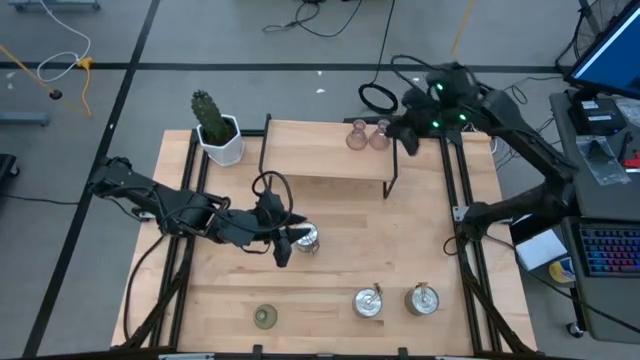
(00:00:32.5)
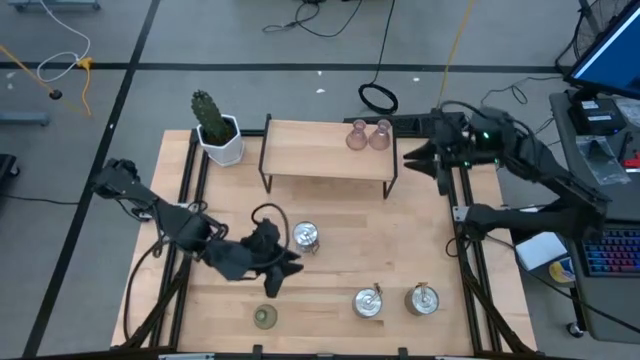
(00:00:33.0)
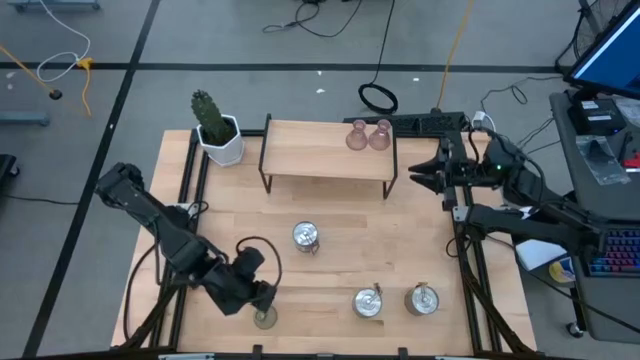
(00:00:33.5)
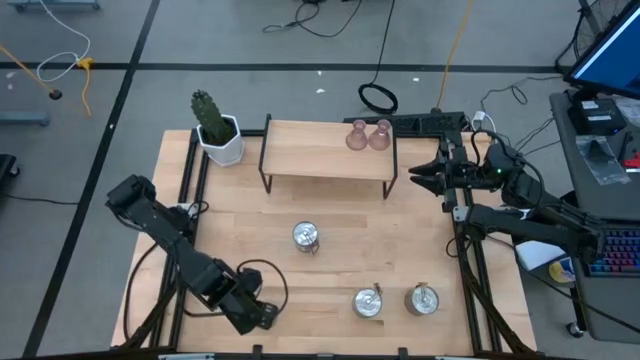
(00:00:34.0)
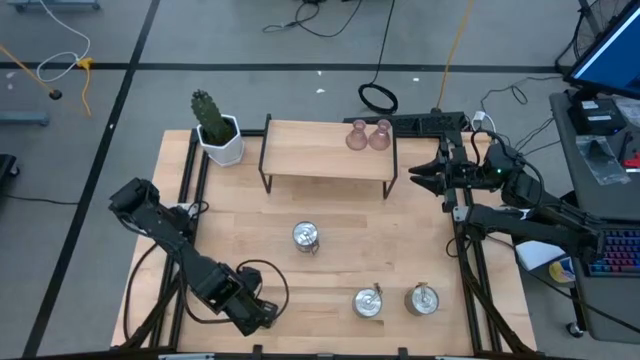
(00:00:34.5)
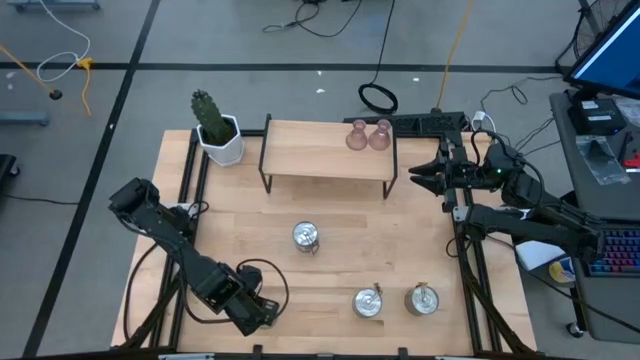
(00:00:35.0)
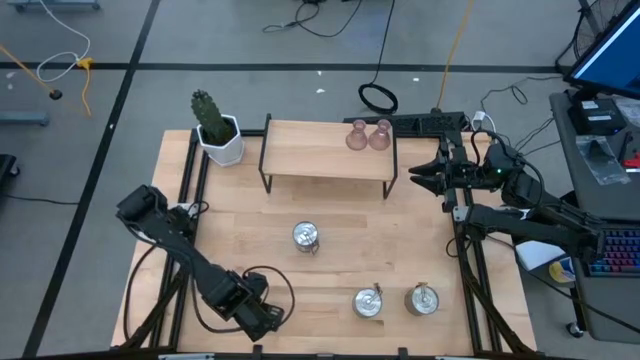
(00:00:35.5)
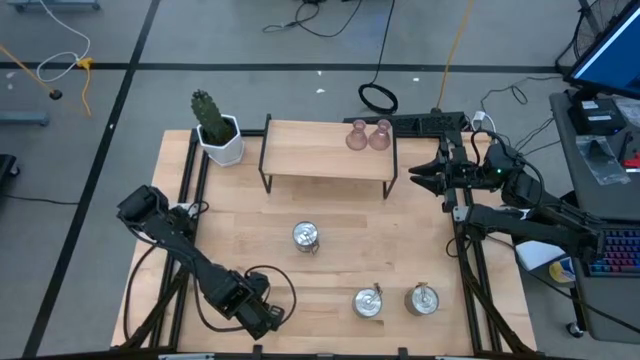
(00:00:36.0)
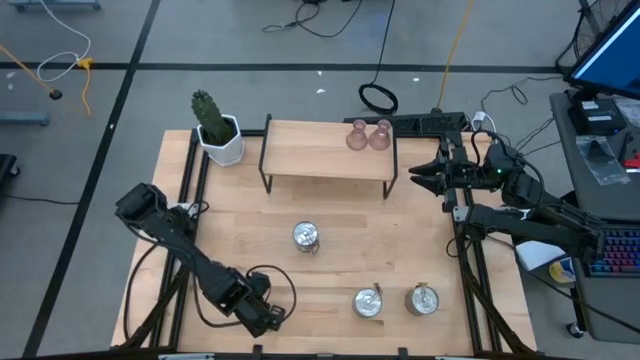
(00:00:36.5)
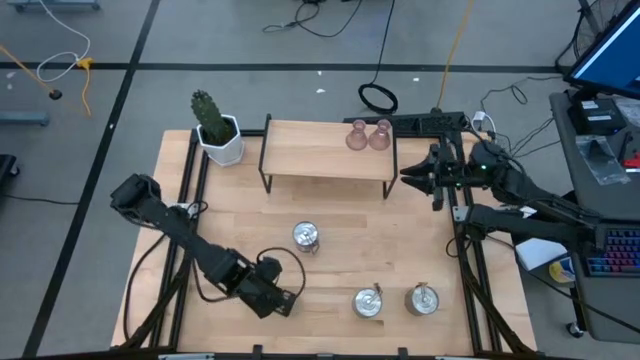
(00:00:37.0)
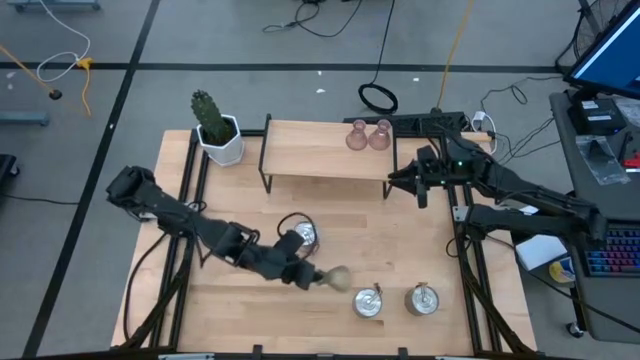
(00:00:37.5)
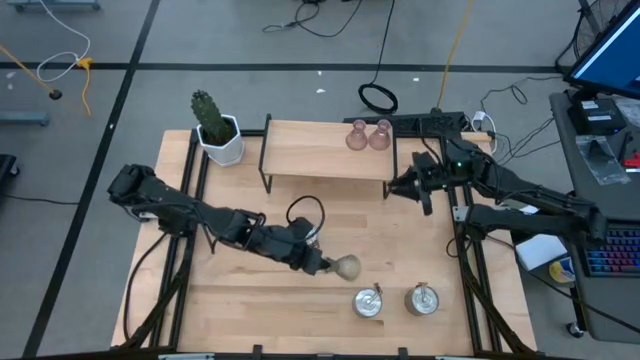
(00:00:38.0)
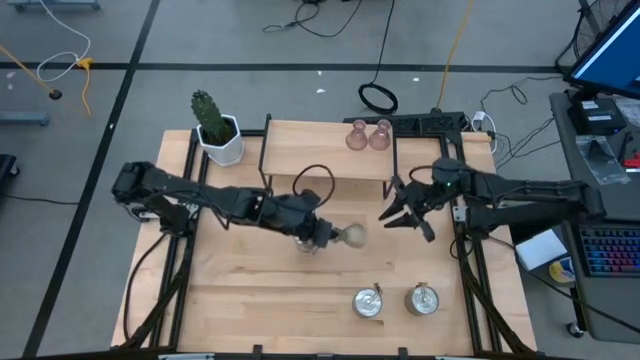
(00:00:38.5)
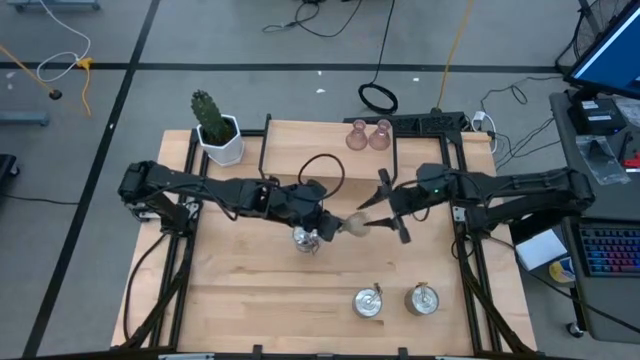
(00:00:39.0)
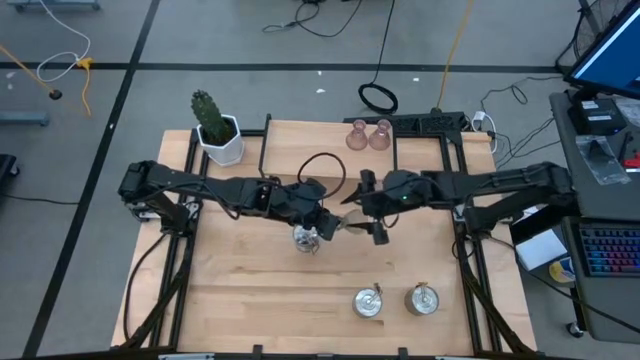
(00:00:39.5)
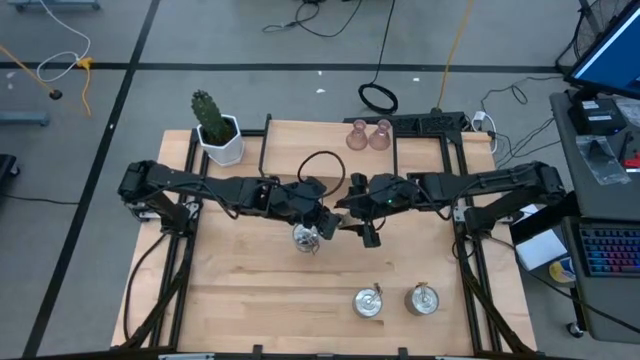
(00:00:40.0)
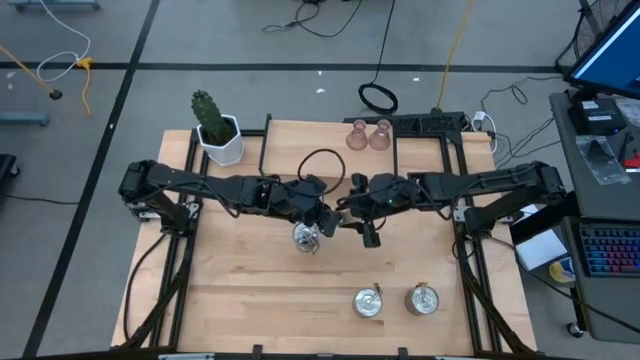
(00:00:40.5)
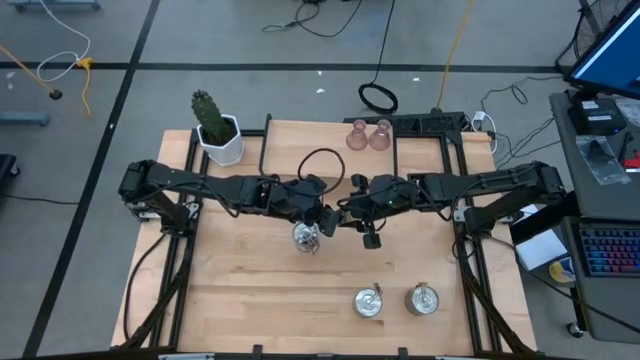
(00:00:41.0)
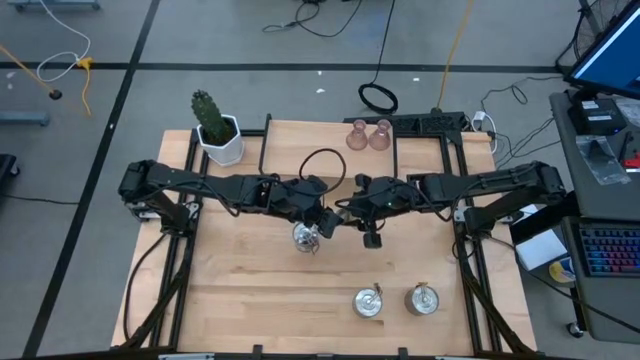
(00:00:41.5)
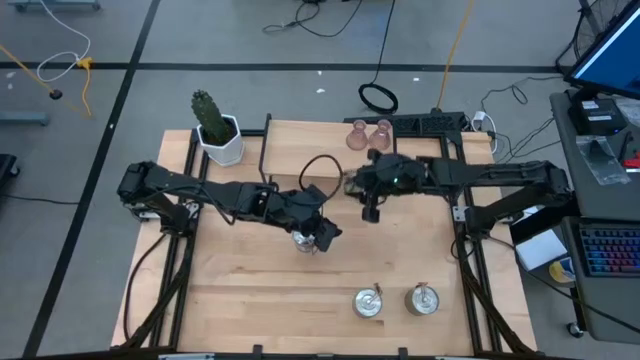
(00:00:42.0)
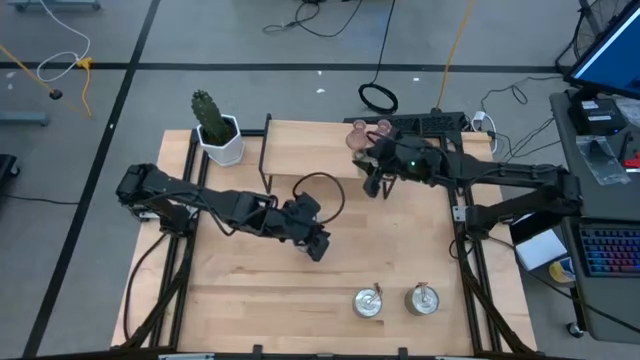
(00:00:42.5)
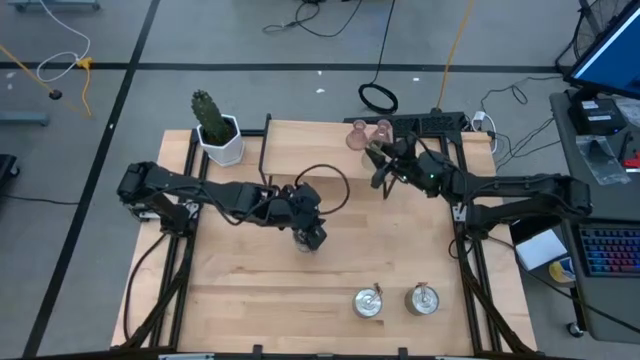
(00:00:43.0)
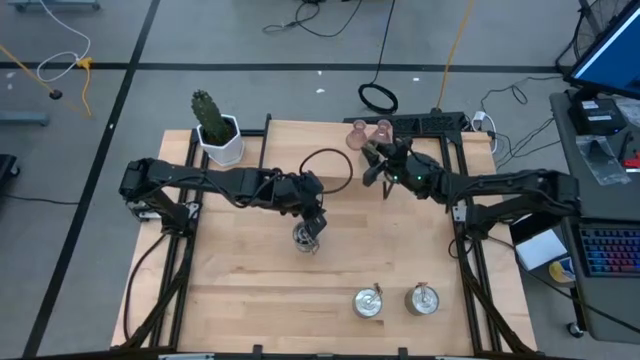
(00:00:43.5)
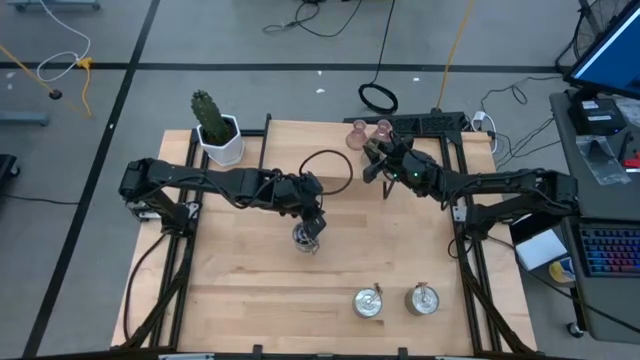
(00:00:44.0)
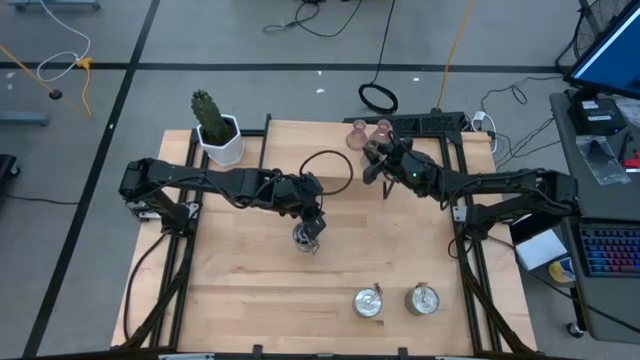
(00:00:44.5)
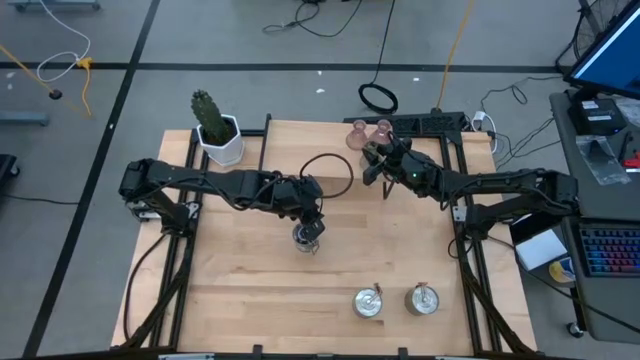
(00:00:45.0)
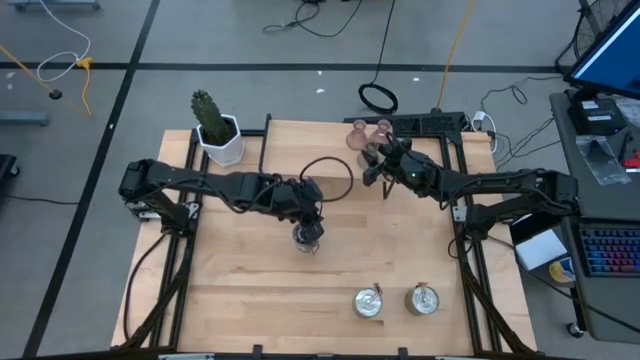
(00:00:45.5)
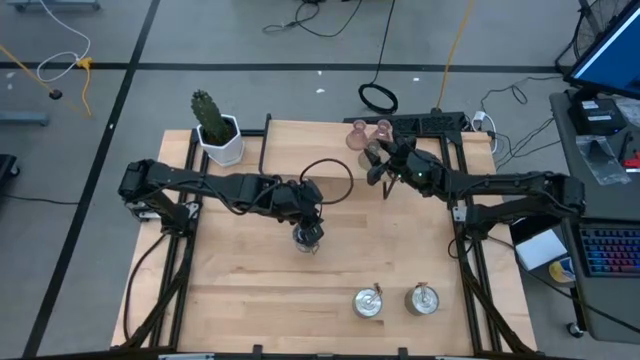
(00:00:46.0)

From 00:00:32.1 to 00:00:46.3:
Task: Pick & Place candle stick holders
Put the green candle holder on the shelf

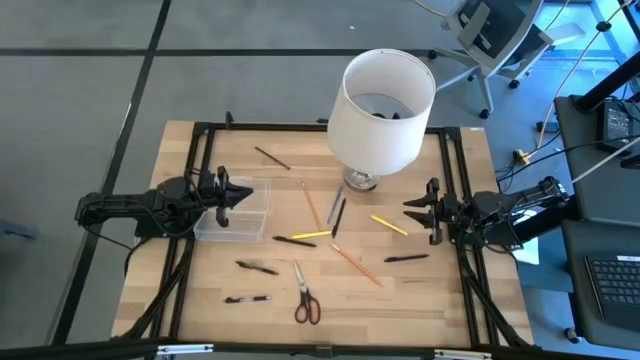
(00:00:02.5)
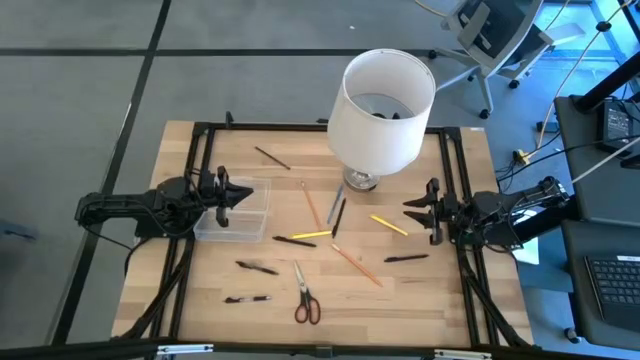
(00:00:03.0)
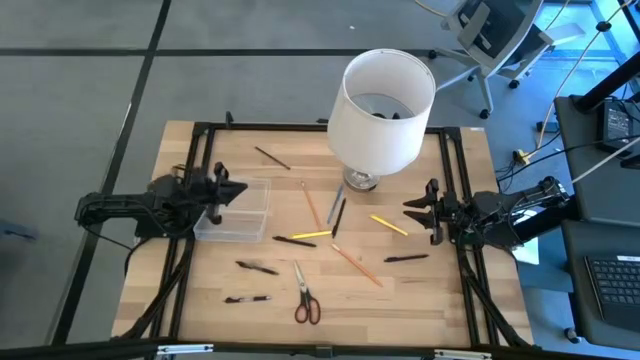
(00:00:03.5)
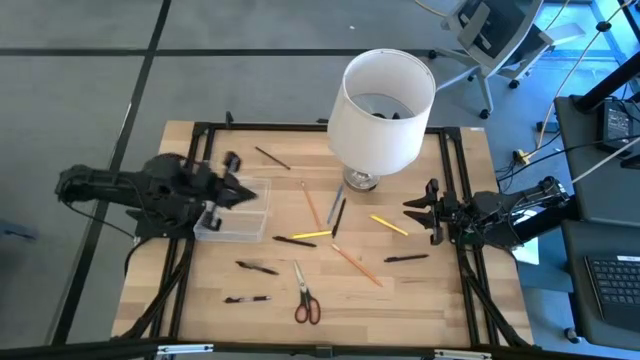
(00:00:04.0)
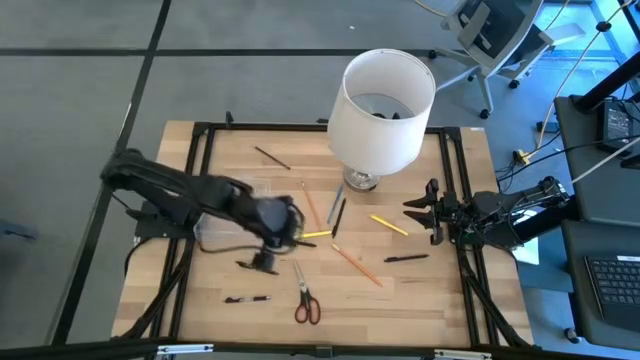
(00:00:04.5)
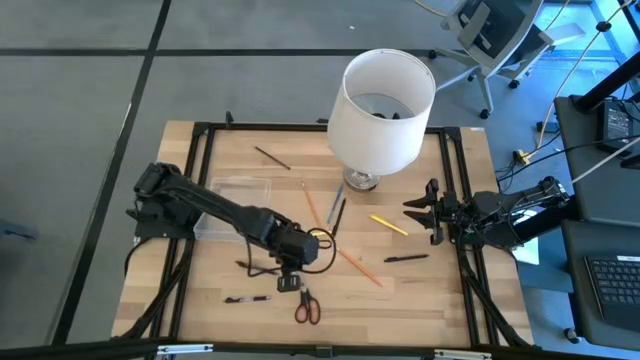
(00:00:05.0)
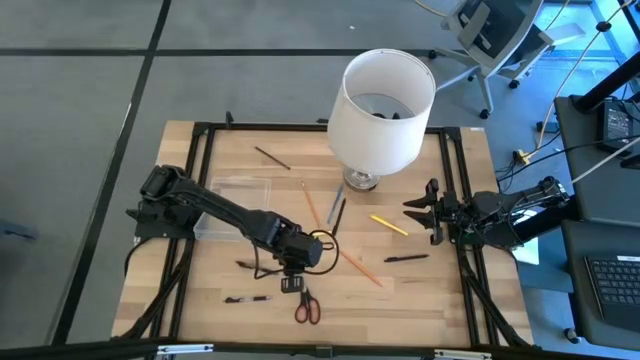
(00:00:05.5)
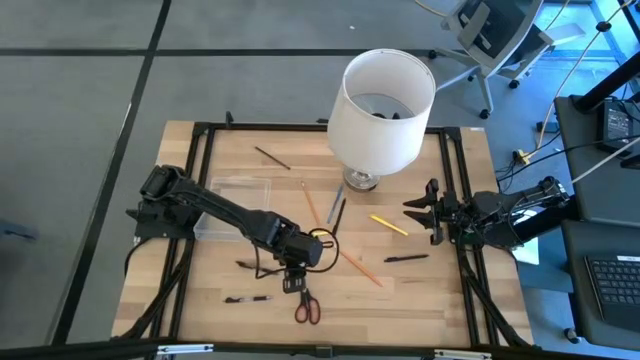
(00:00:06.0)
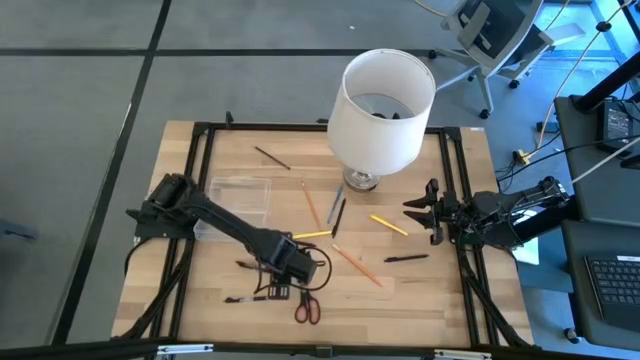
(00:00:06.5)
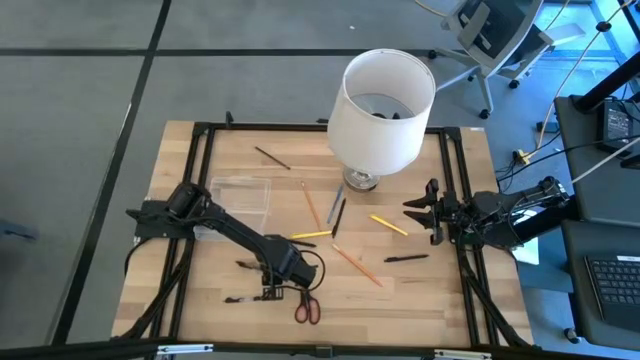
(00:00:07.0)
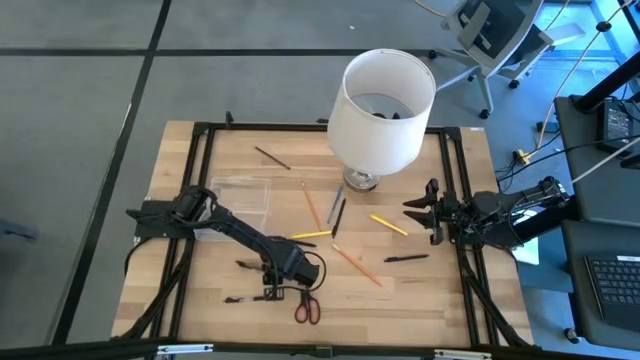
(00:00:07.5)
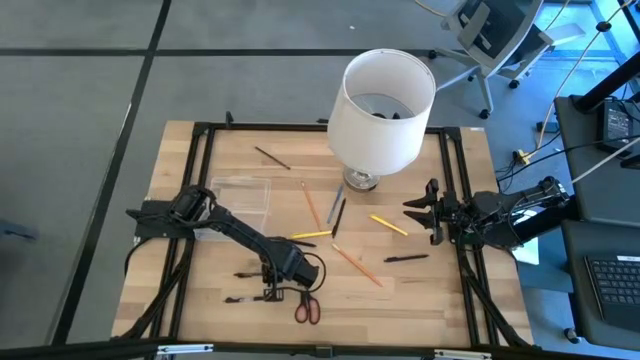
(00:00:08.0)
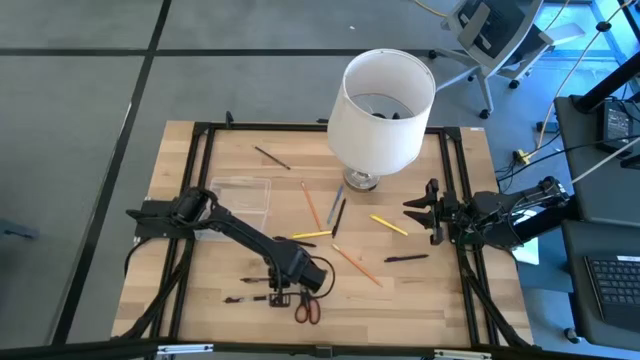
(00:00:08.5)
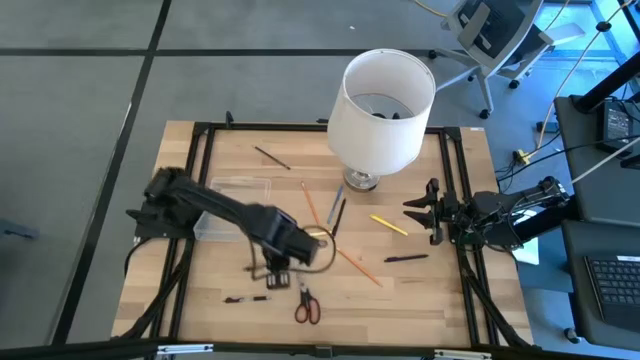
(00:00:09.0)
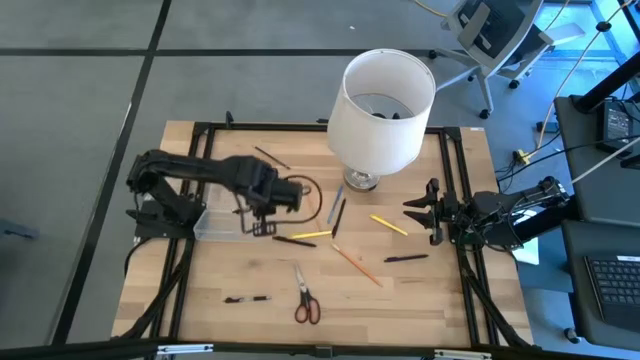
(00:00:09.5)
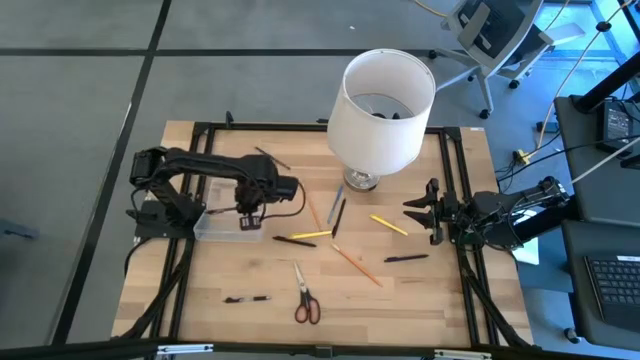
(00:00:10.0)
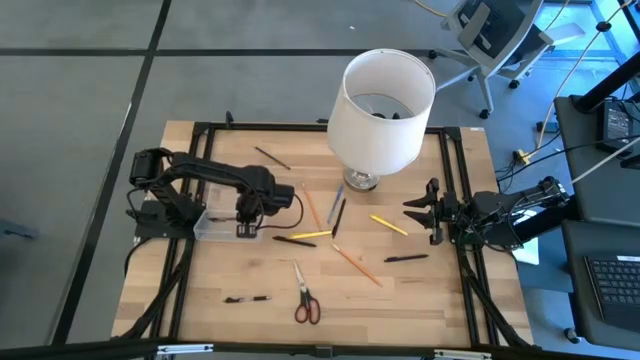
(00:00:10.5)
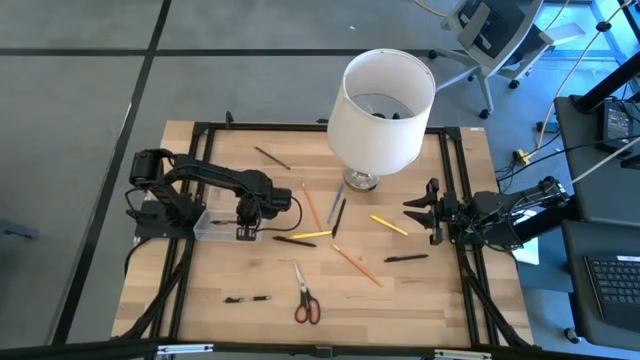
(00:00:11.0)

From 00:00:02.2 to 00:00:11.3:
Task: Pick & place school supplies into a supply box
Put the black pen into the transparent supply box
